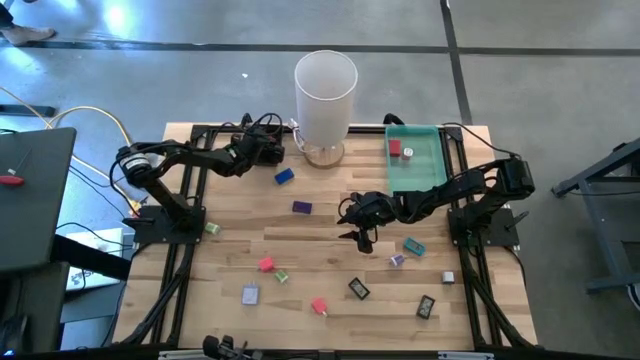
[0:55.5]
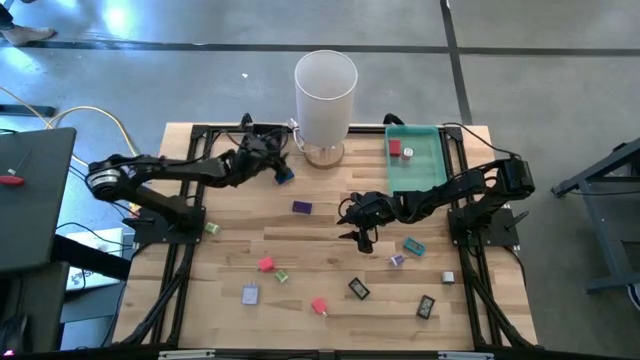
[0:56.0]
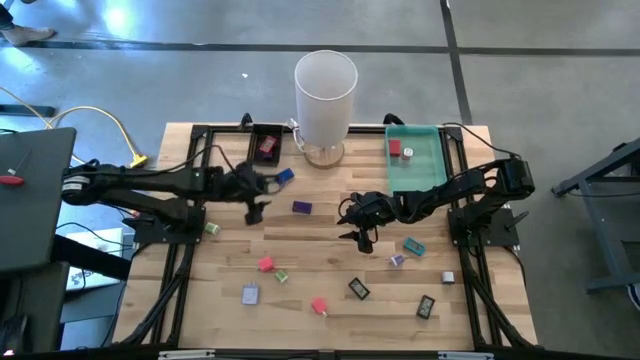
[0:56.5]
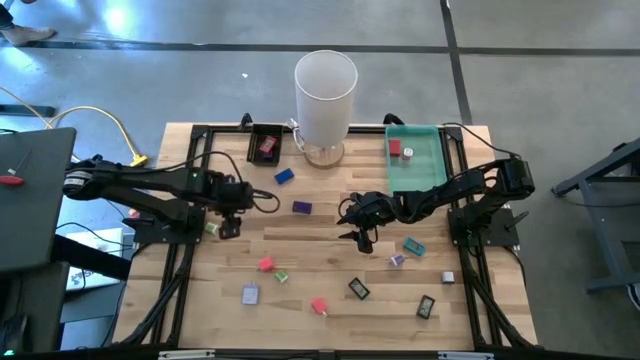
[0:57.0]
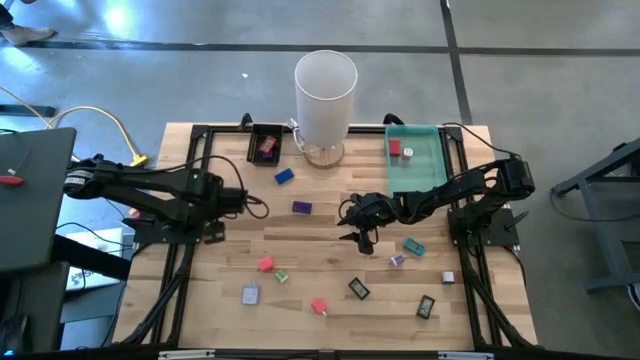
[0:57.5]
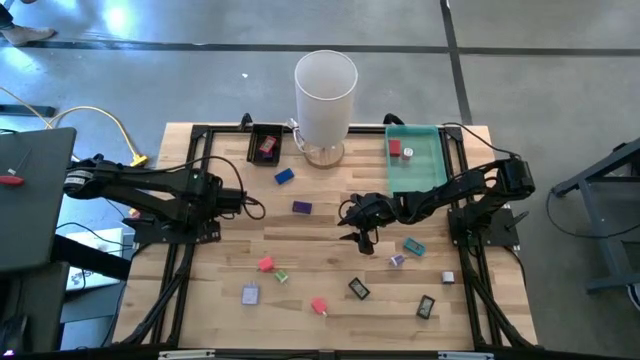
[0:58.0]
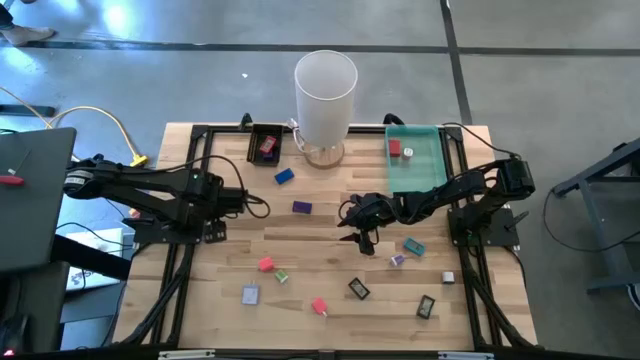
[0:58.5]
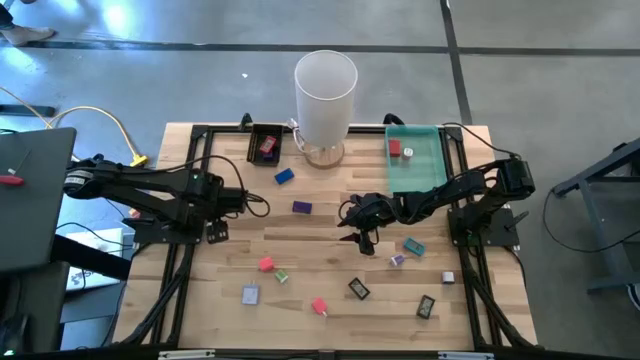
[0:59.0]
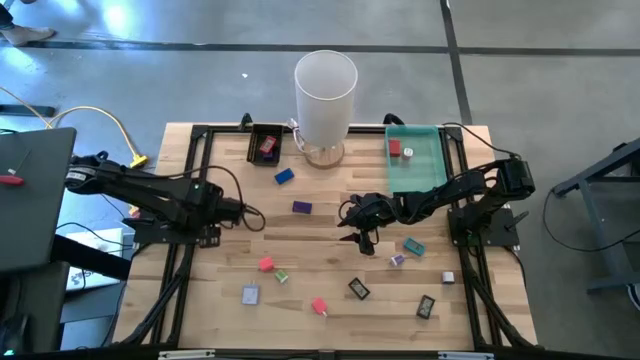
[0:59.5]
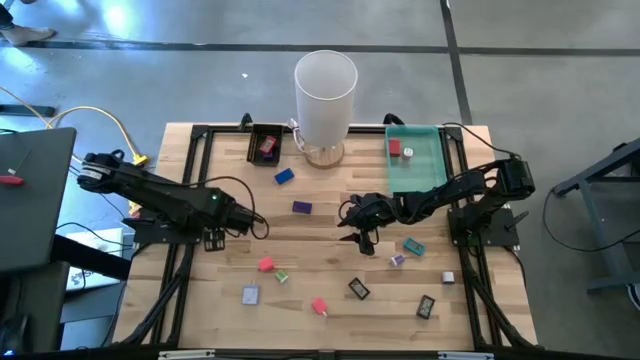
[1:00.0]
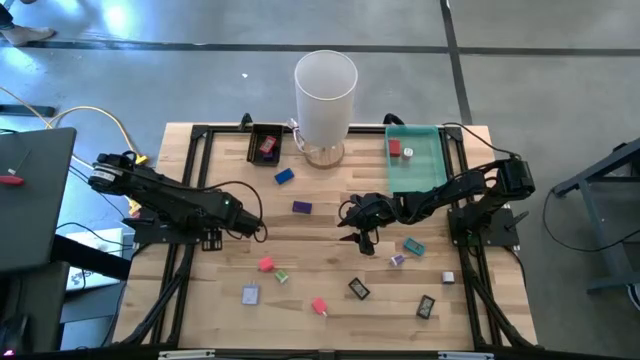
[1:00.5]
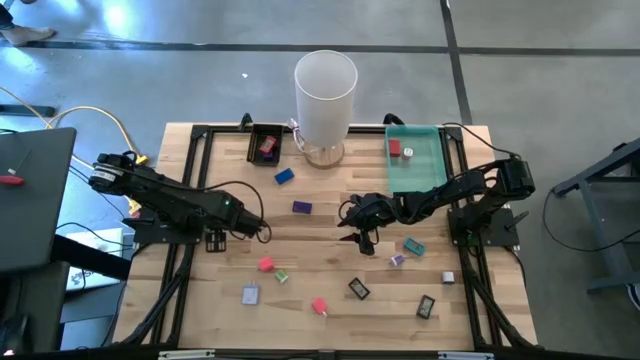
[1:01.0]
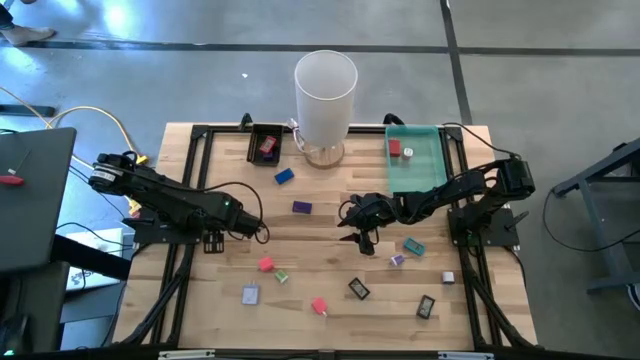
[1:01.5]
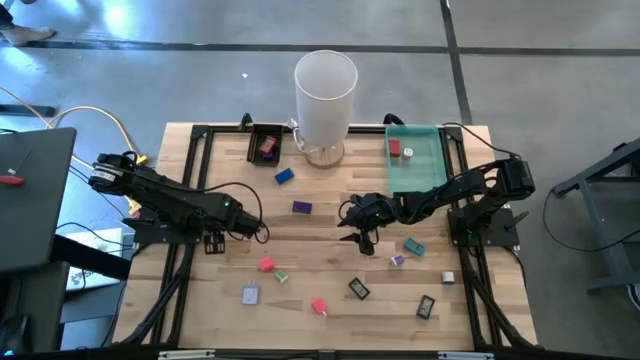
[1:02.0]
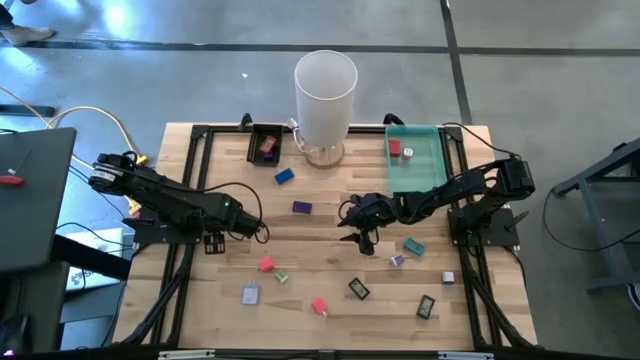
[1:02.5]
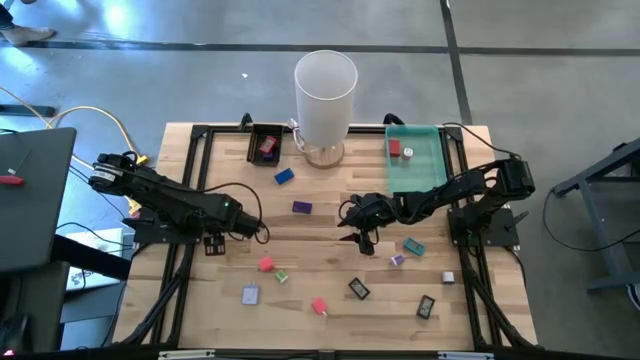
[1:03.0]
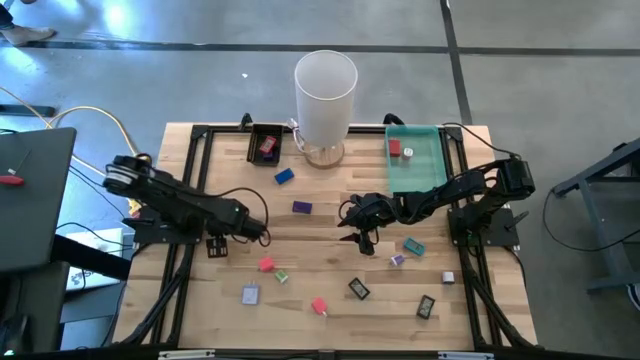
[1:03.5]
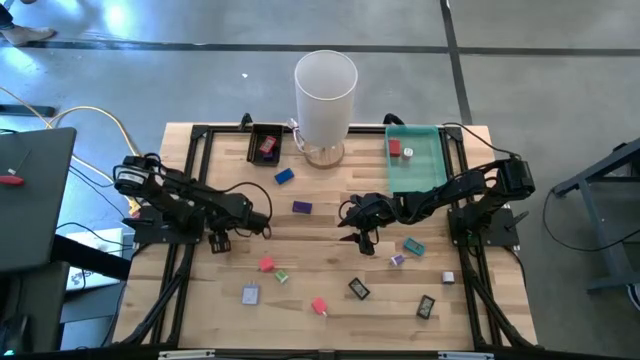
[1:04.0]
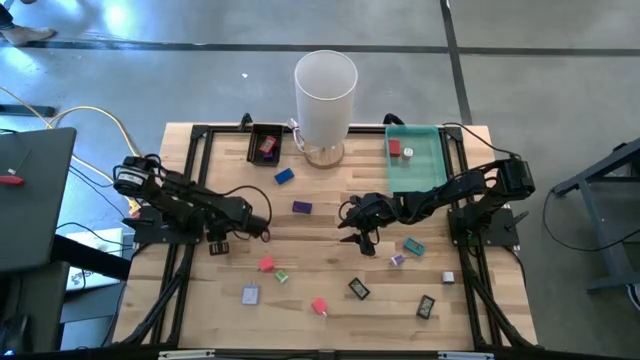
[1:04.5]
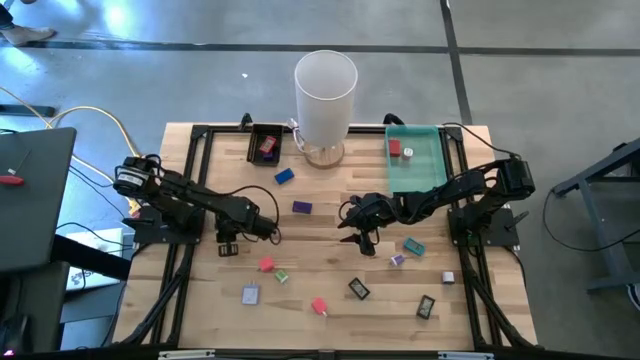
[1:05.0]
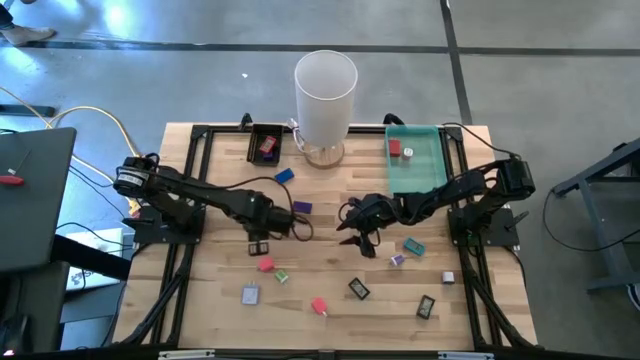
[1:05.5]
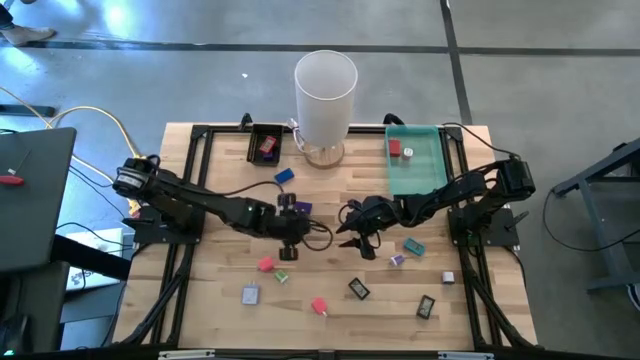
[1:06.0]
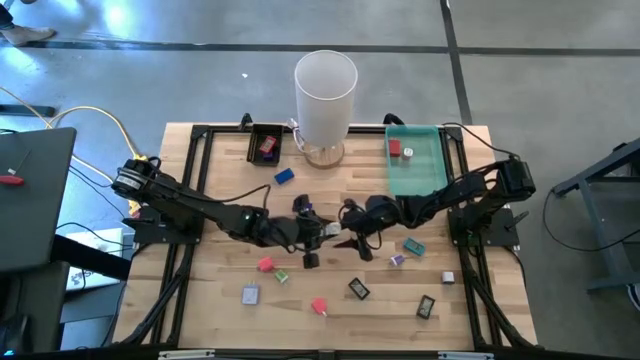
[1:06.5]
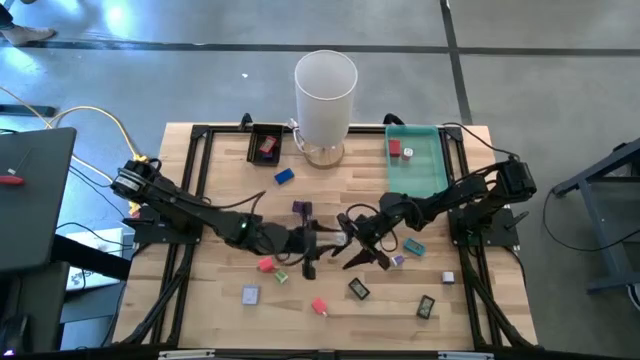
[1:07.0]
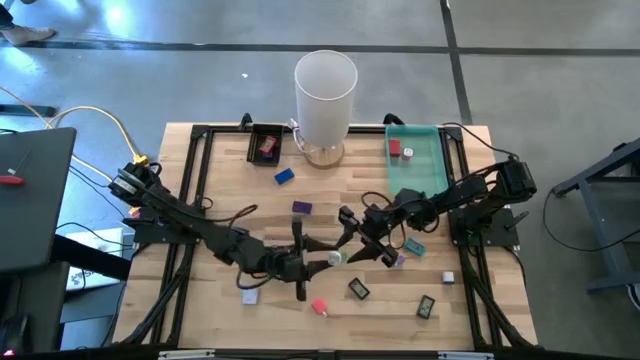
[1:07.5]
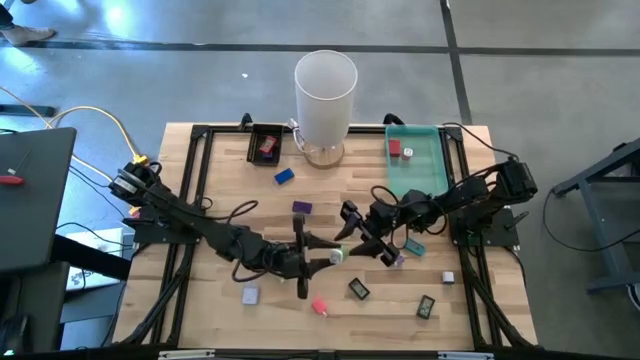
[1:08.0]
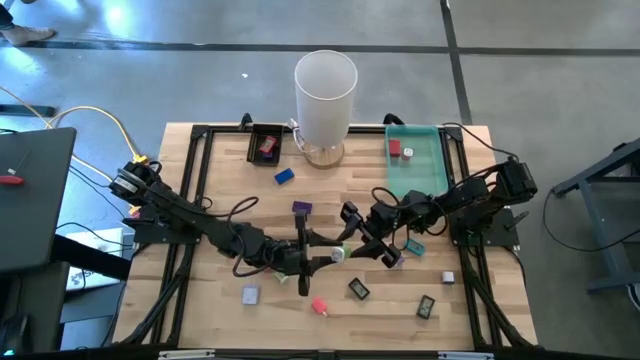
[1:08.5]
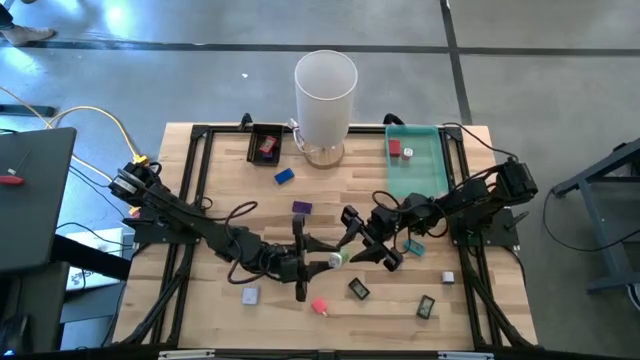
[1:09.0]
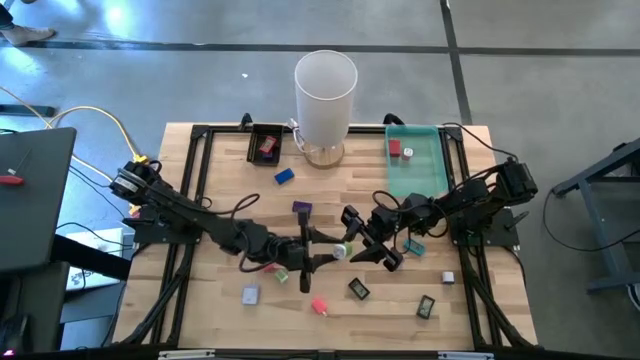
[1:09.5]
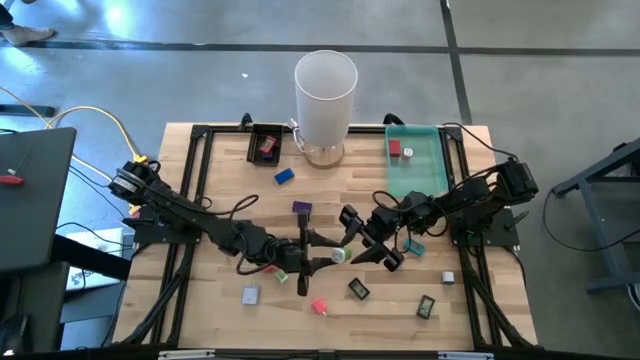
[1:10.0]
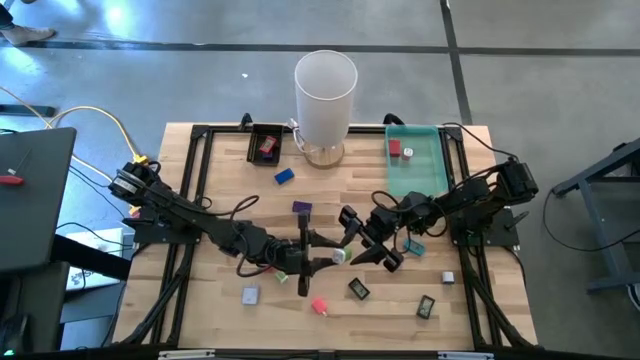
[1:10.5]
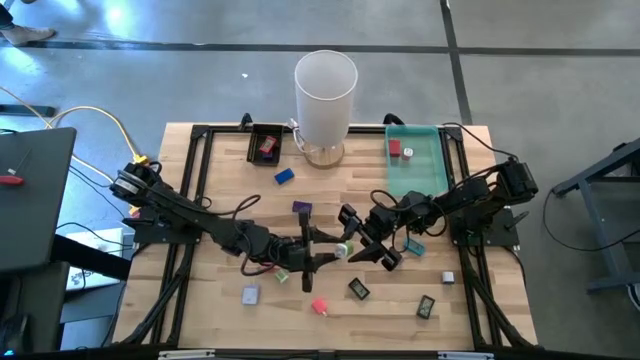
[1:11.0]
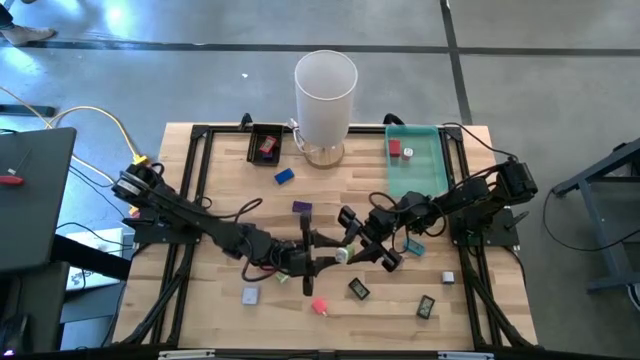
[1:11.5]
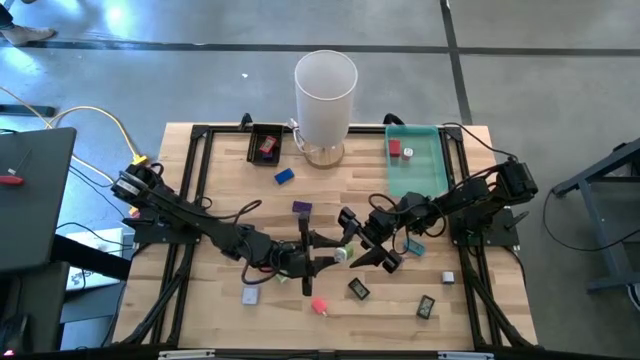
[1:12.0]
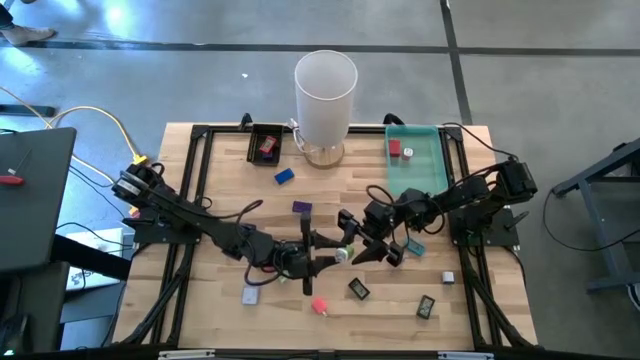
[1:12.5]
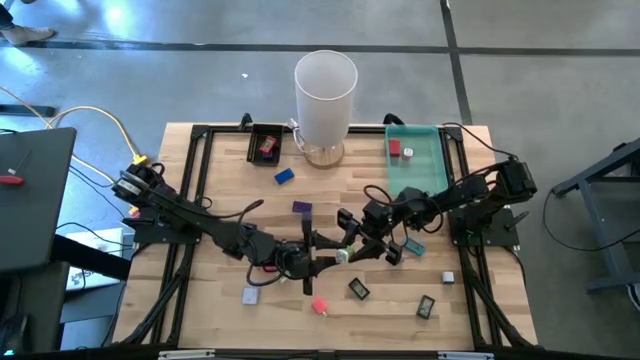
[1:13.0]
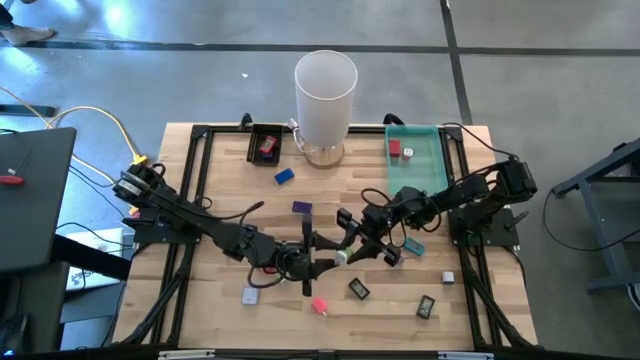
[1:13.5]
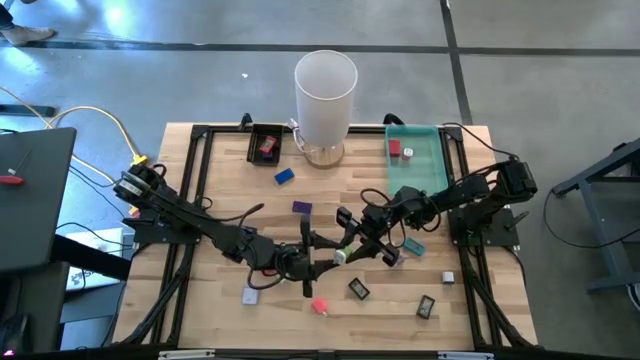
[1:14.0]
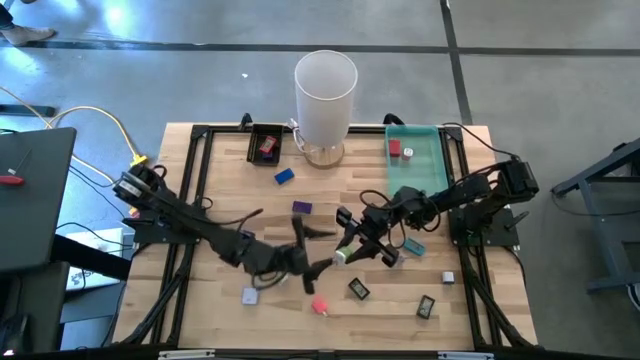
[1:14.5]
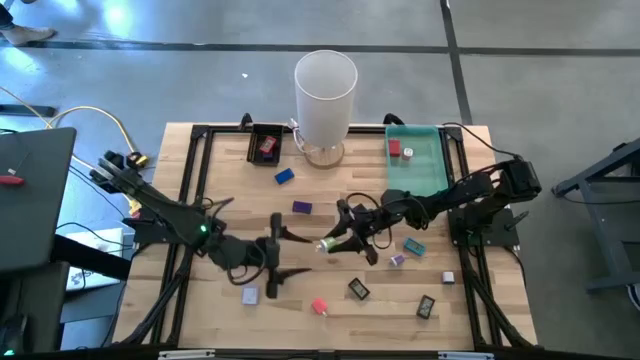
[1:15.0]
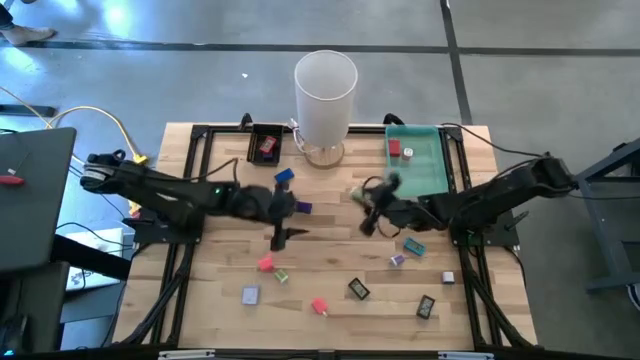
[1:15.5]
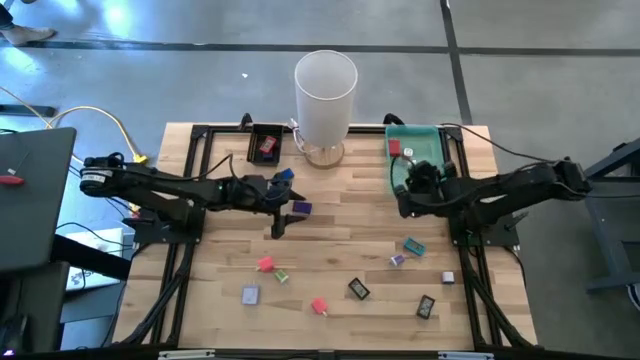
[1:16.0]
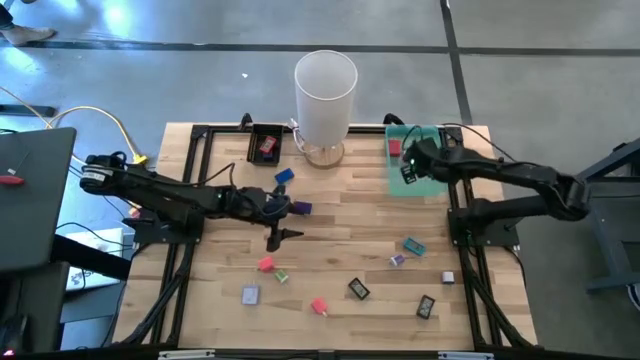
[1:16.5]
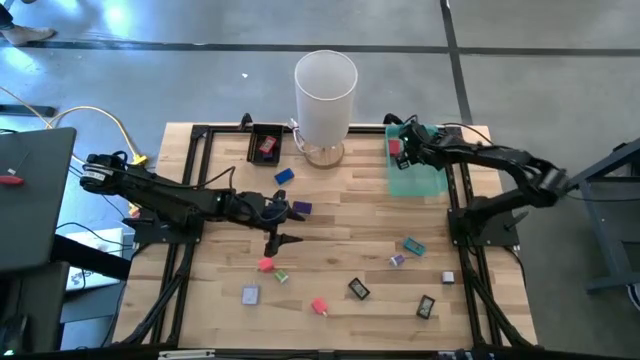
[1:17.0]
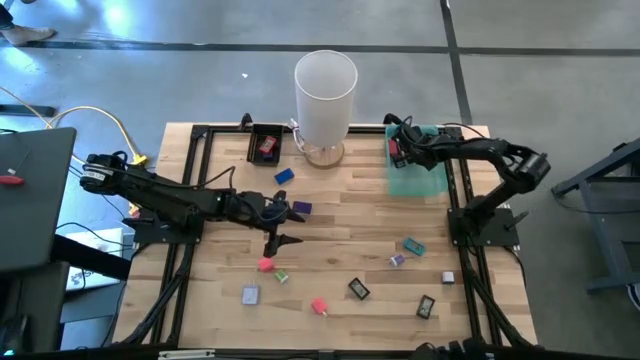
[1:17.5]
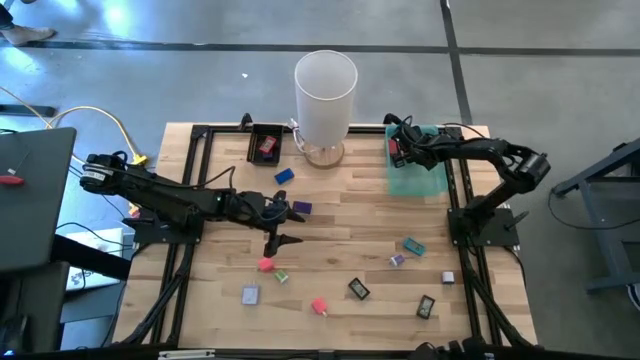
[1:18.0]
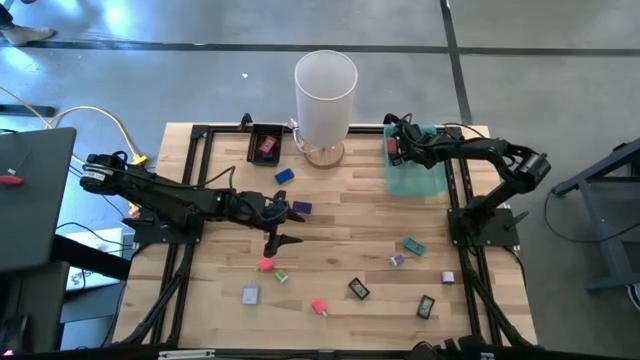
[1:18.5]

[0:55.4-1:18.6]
Task: Pick & Place Office items
Put the left green white adapter into the green bin
